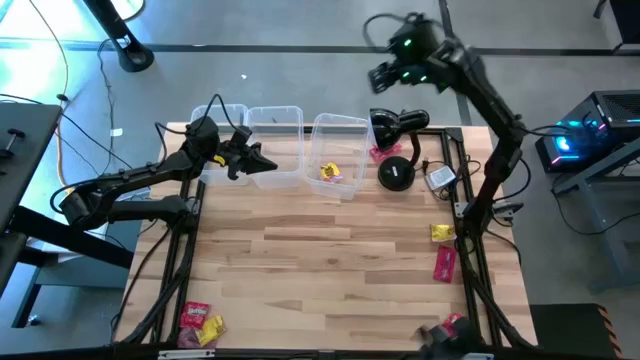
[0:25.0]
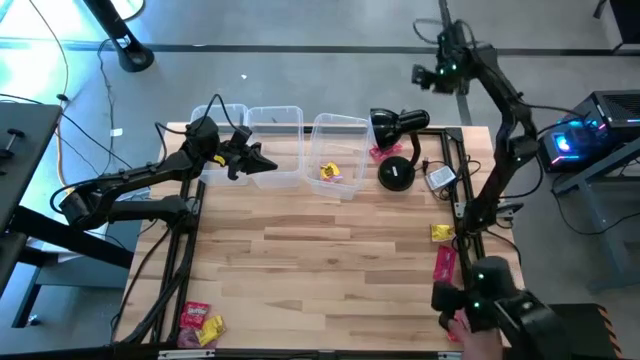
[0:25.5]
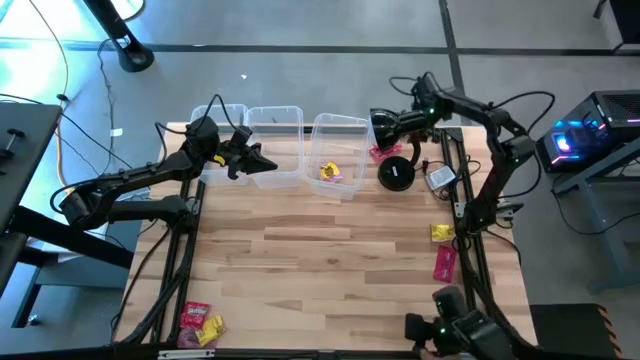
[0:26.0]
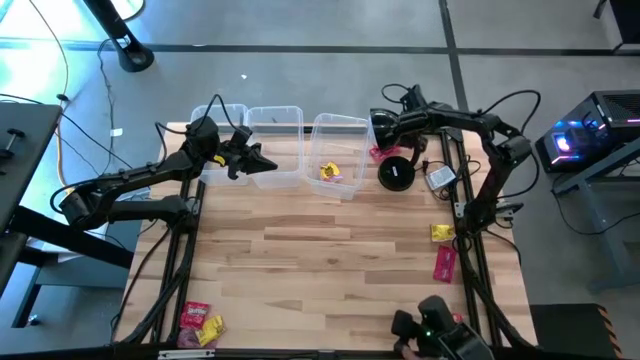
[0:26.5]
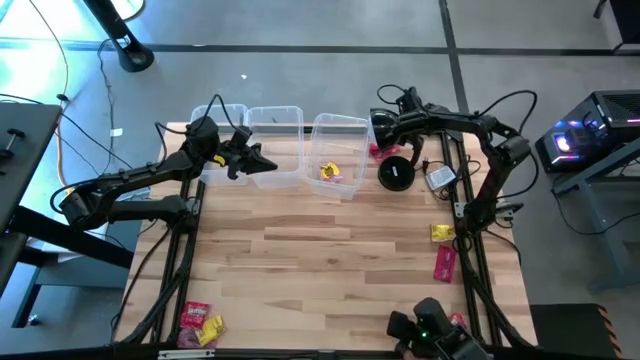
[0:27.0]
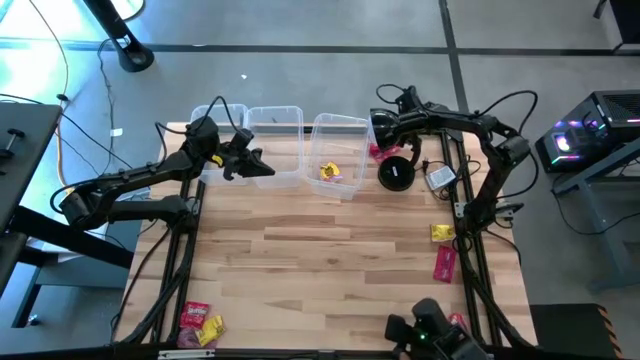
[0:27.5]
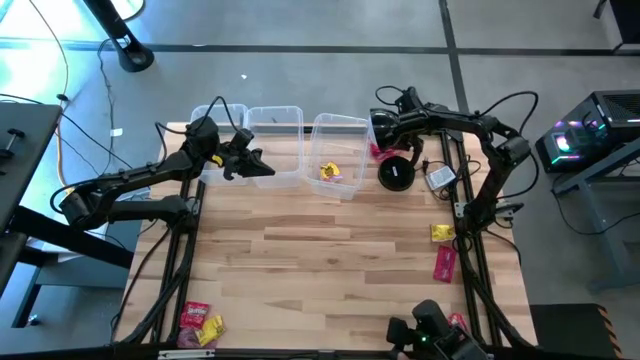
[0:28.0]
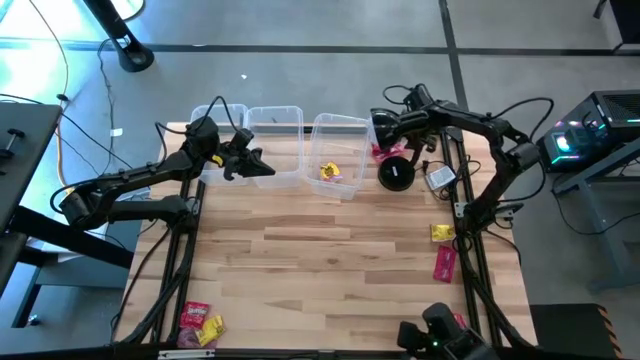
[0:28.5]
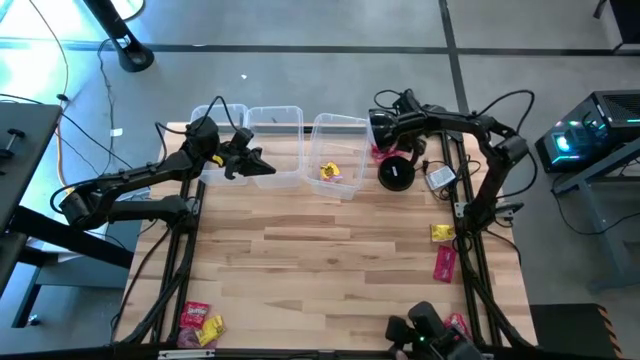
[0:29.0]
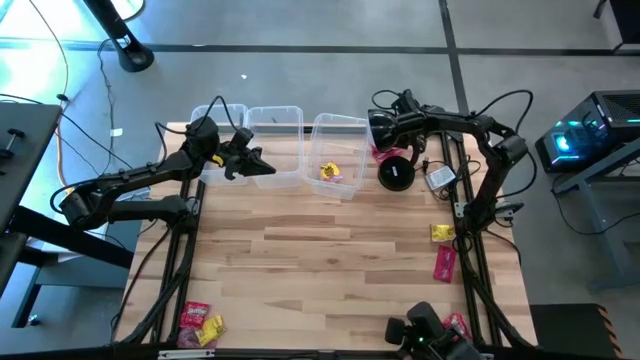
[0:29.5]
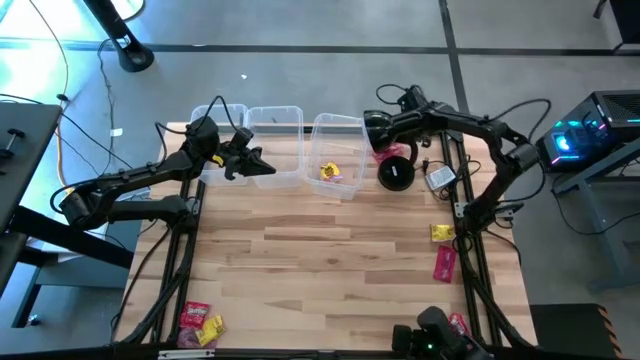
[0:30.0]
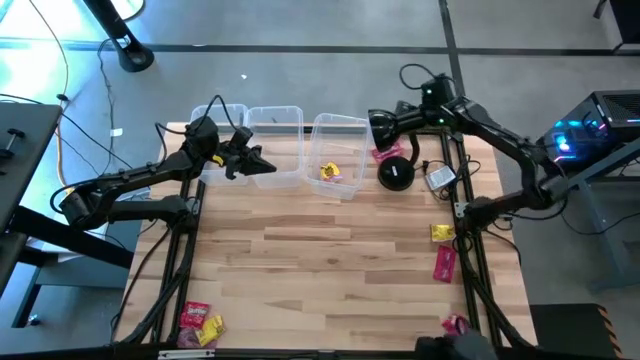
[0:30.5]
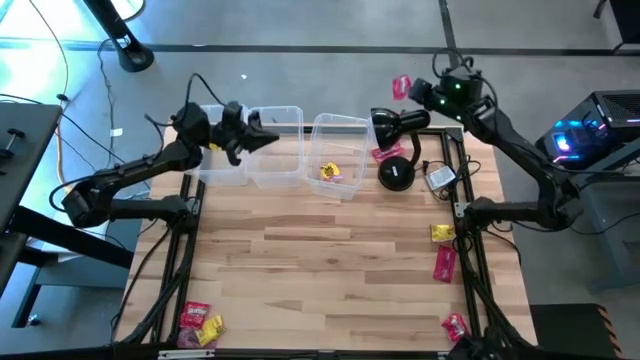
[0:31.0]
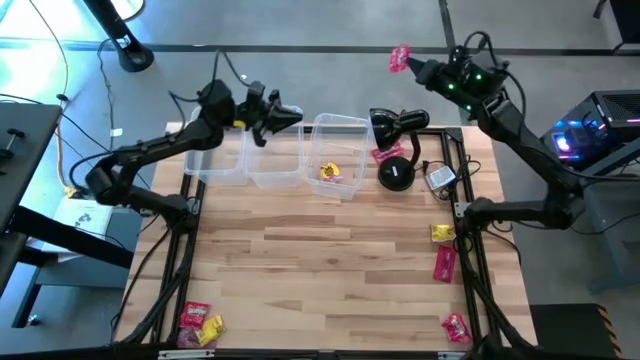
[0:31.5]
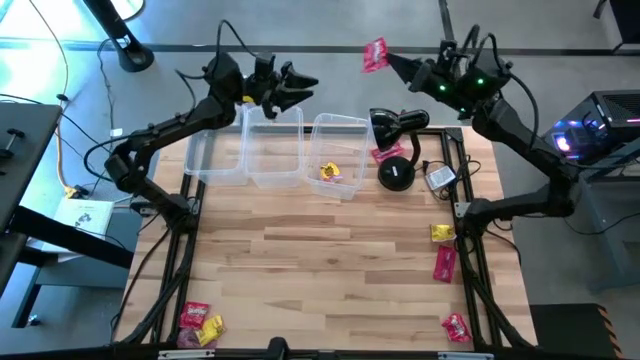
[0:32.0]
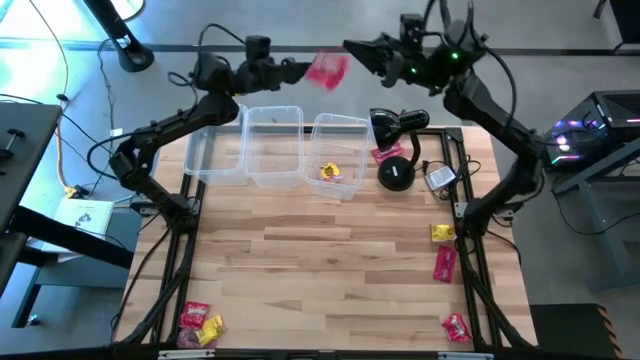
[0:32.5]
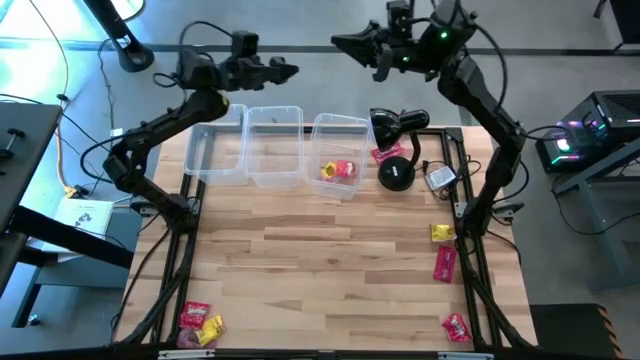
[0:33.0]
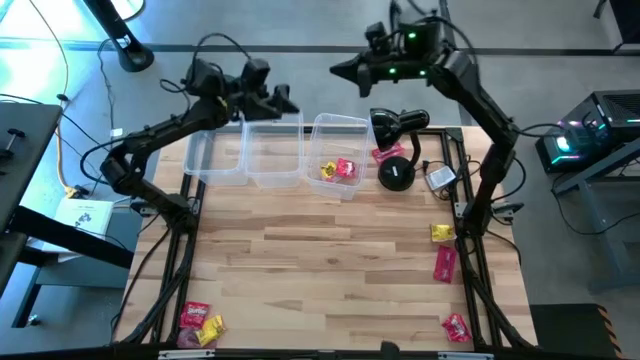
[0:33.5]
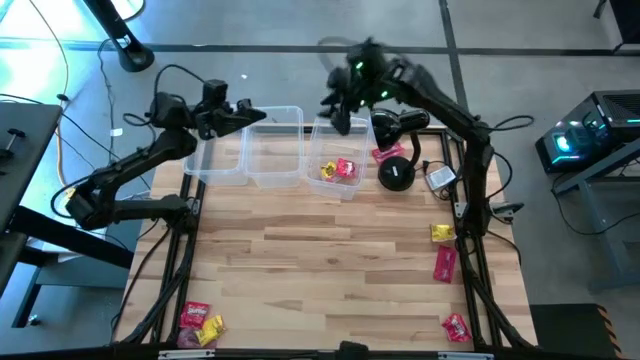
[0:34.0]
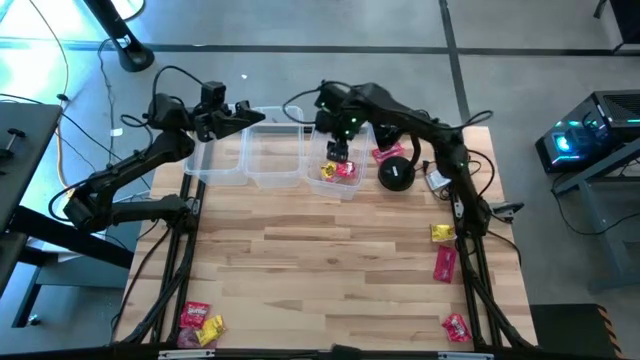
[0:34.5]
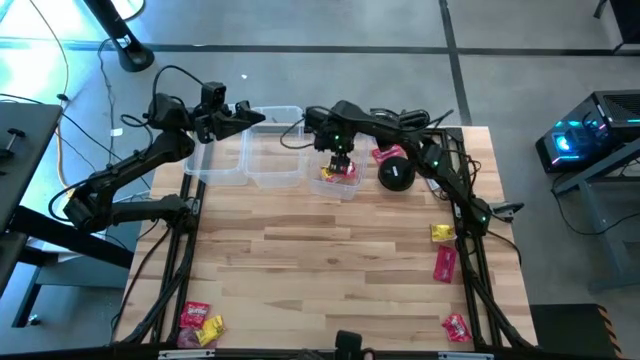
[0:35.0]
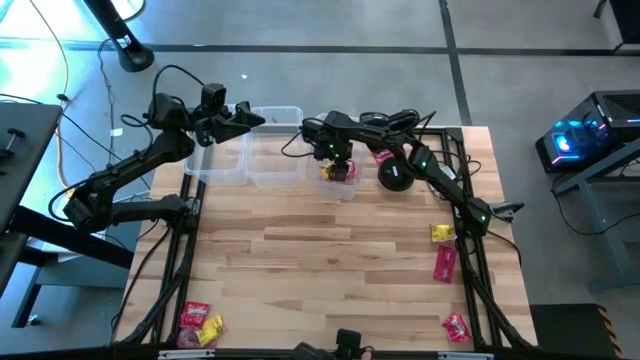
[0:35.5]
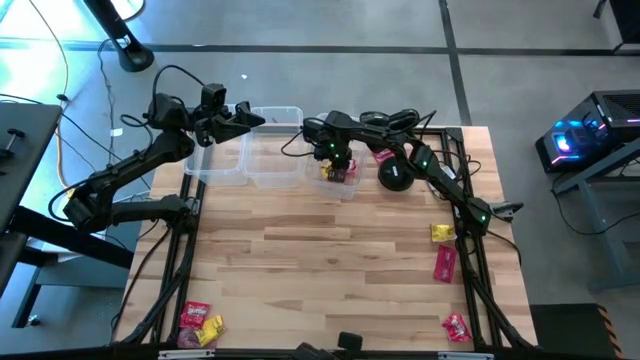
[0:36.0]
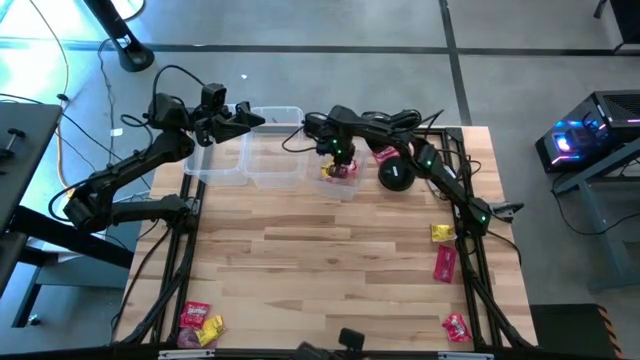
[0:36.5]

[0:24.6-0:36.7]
Task: Sort candy
Put the red candy wrapper into the middle transparent bin

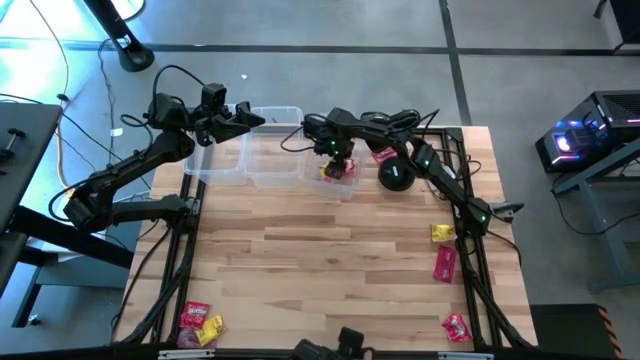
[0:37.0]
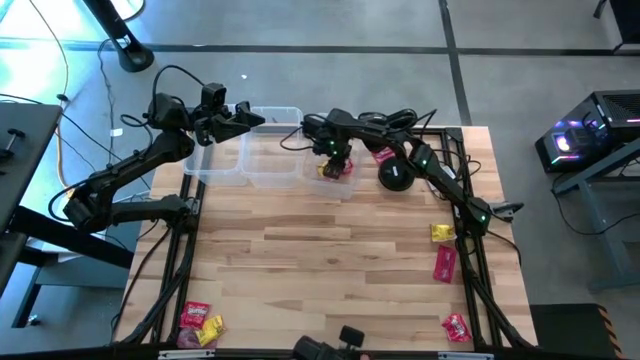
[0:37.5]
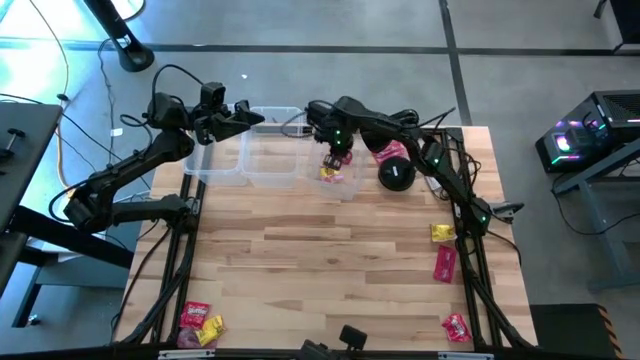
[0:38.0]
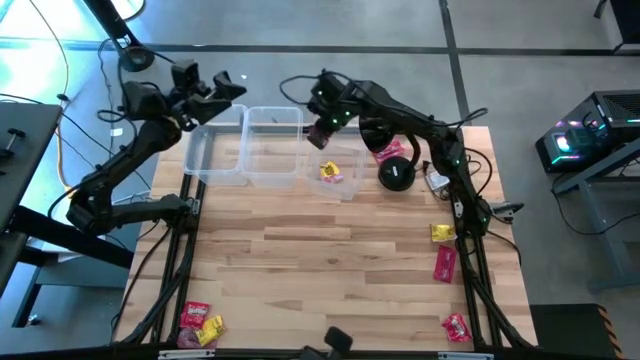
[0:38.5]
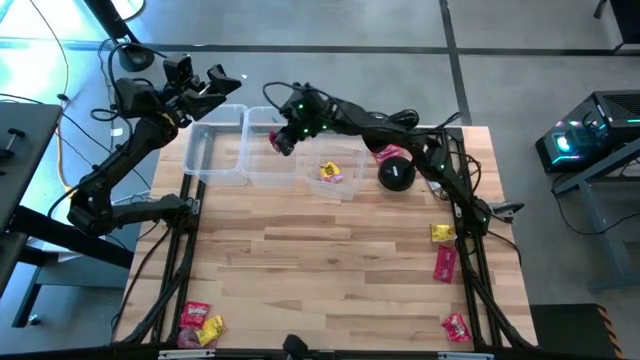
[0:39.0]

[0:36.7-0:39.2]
Put the red candy wrapper into the middle transparent bin

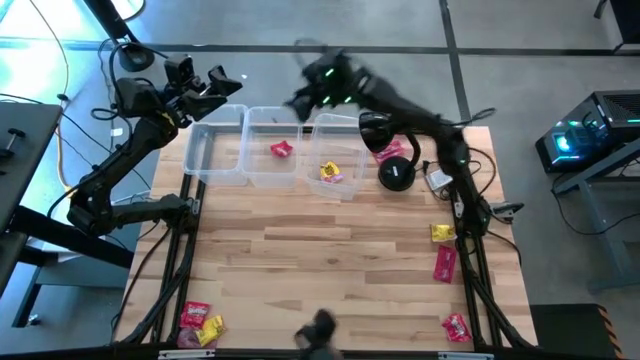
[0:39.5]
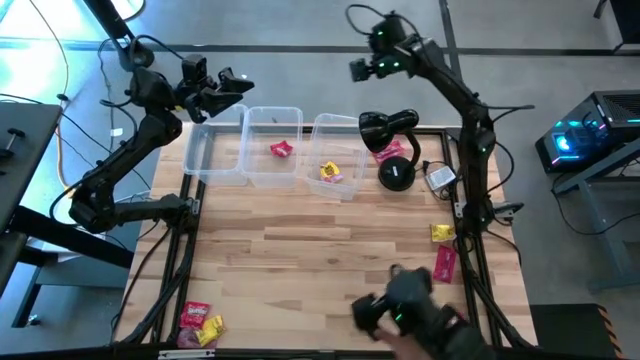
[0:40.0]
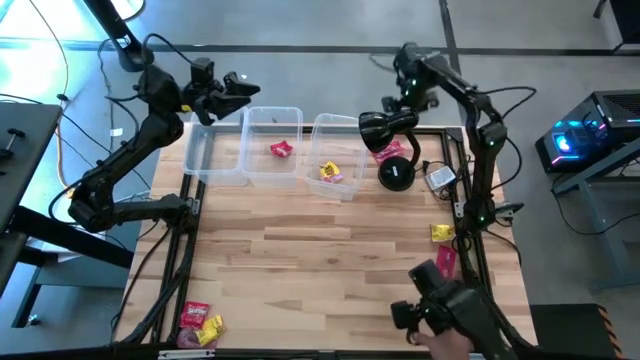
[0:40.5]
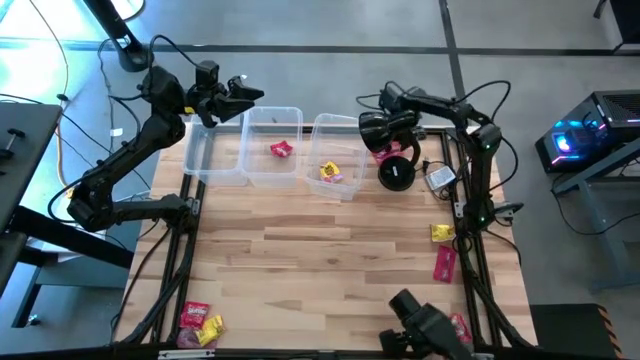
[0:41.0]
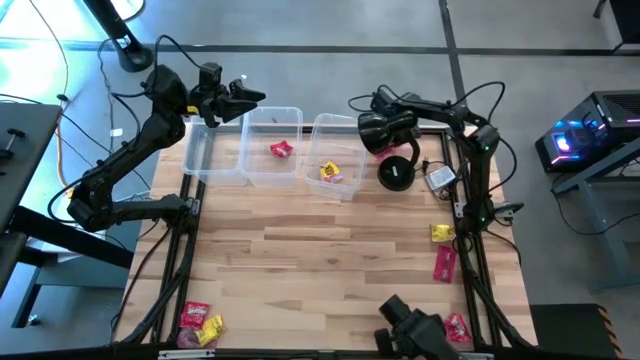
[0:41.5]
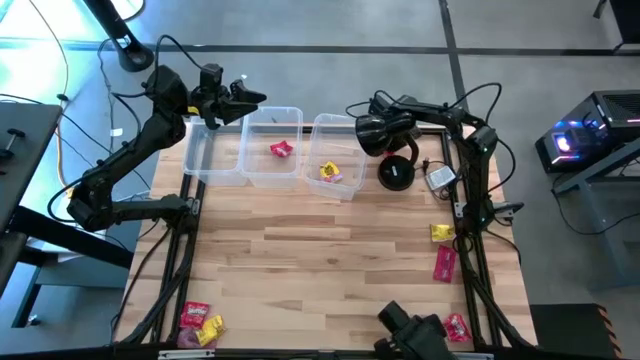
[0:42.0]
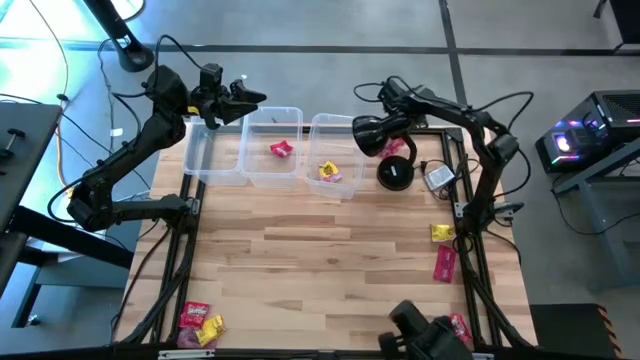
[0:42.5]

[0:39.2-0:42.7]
Put the pink candy wrapper into the left transparent bin

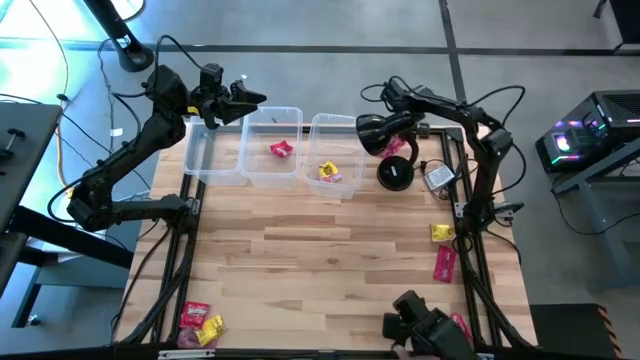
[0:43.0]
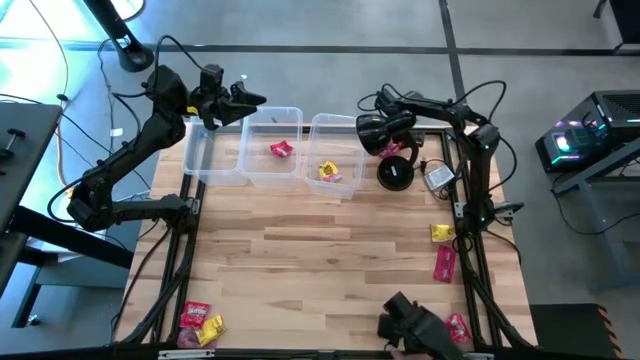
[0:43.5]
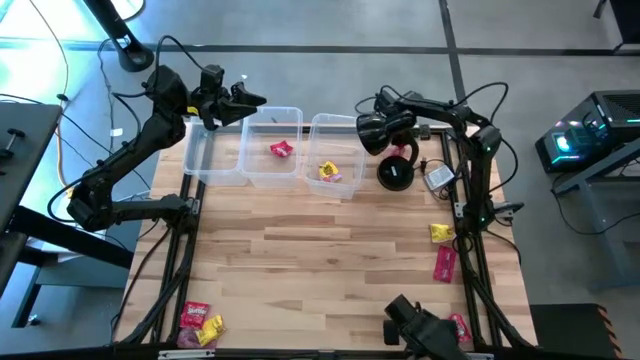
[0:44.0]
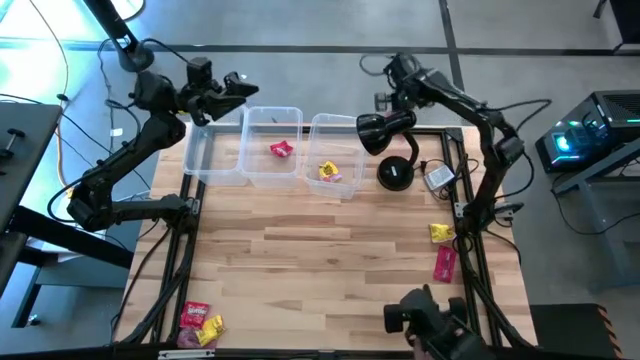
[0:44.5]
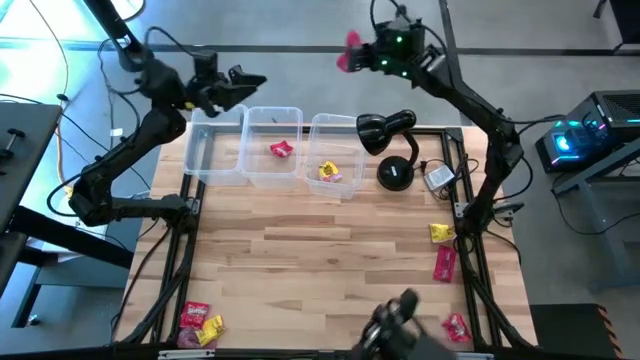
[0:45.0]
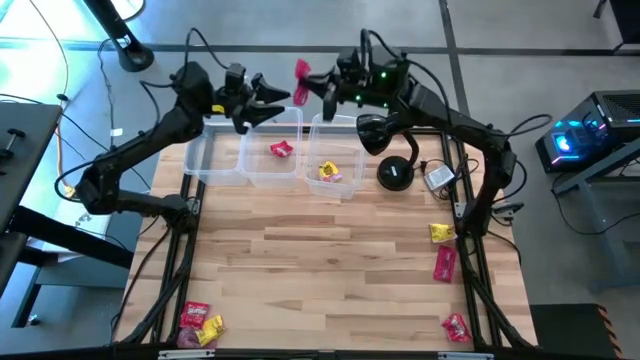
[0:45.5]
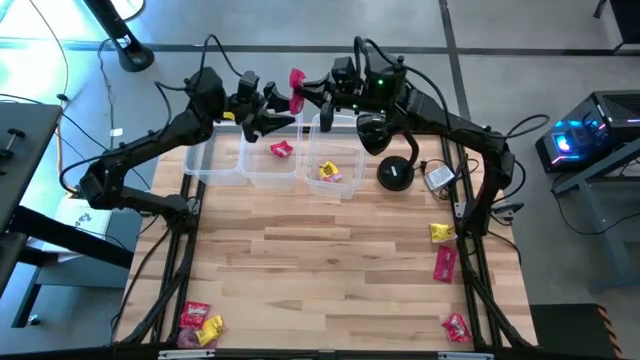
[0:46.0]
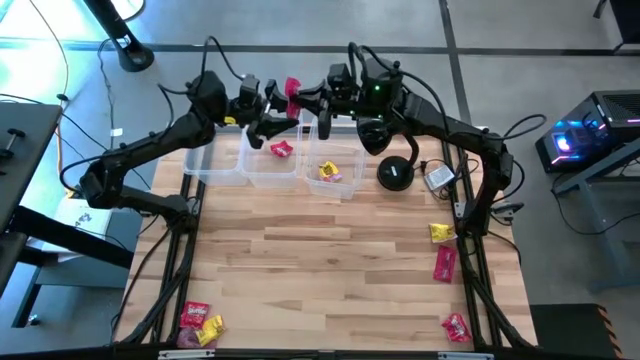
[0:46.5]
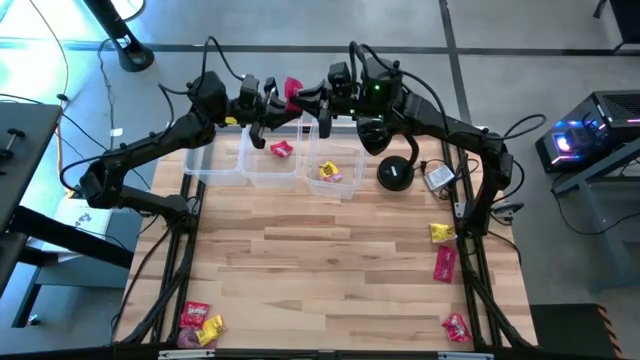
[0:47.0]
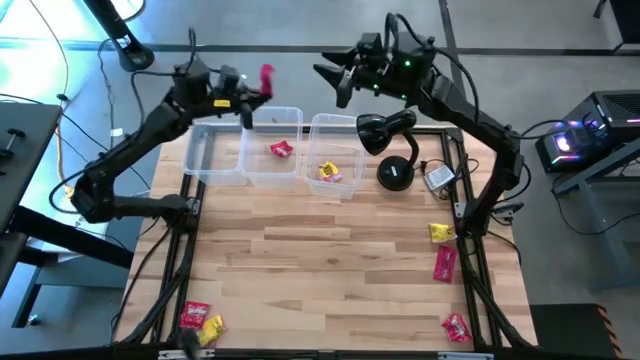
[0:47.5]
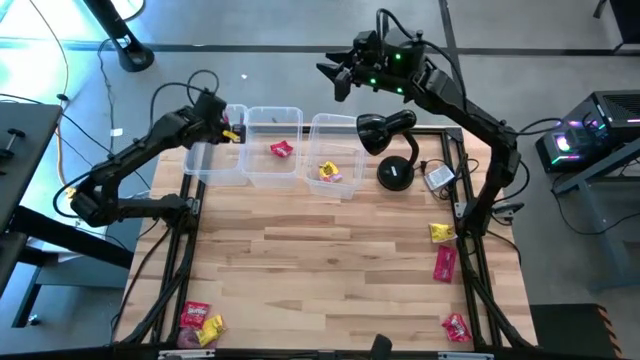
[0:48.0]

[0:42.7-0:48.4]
Put the pink candy wrapper into the left transparent bin
